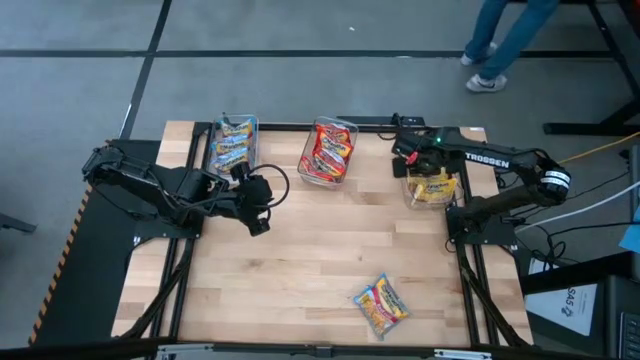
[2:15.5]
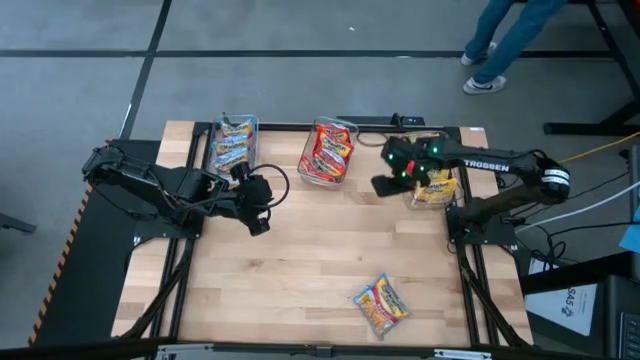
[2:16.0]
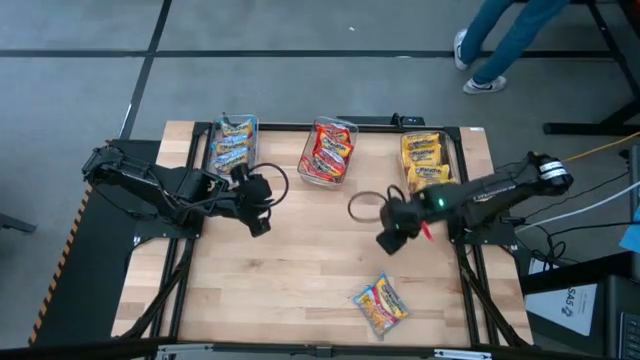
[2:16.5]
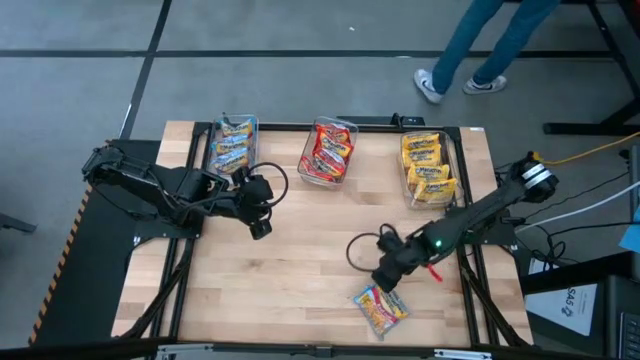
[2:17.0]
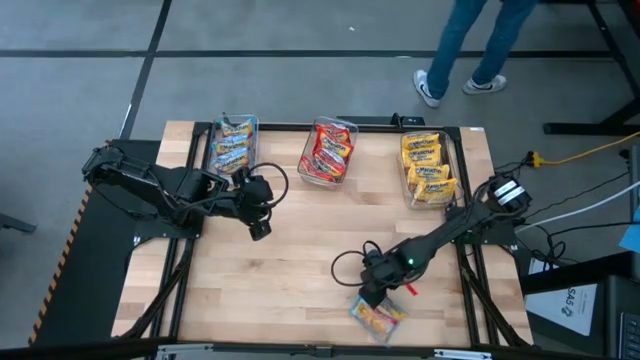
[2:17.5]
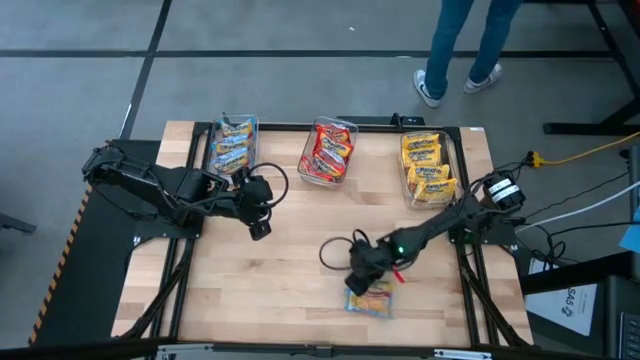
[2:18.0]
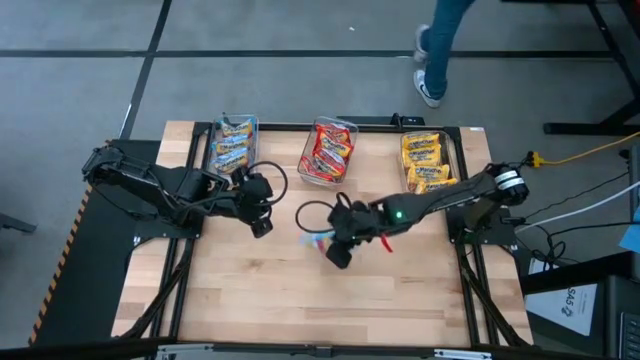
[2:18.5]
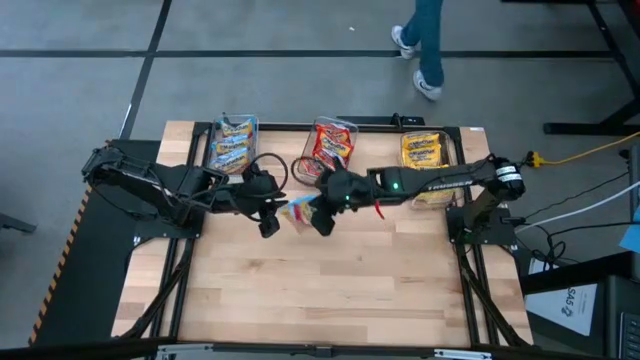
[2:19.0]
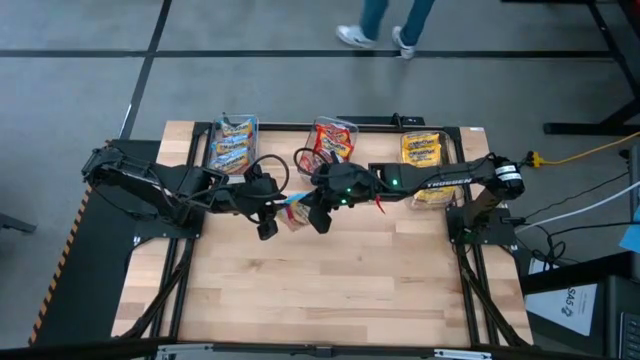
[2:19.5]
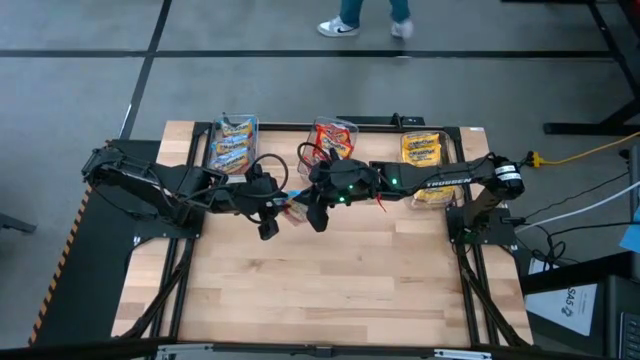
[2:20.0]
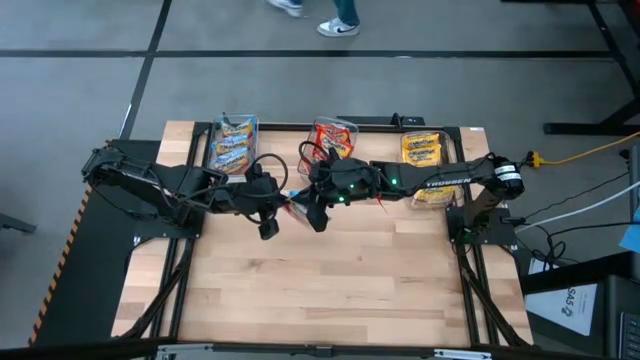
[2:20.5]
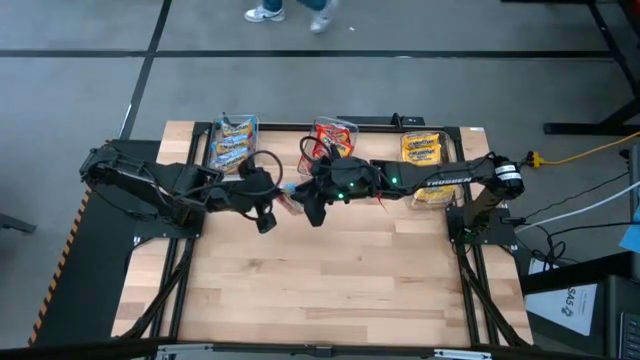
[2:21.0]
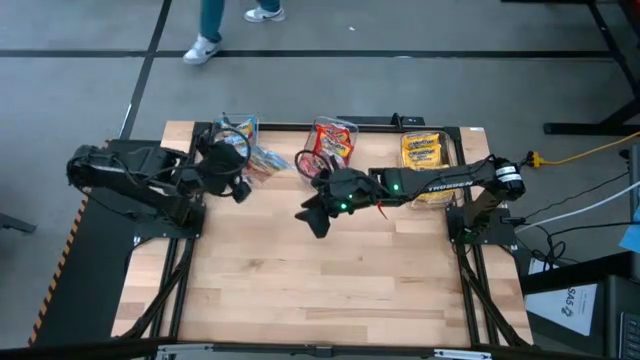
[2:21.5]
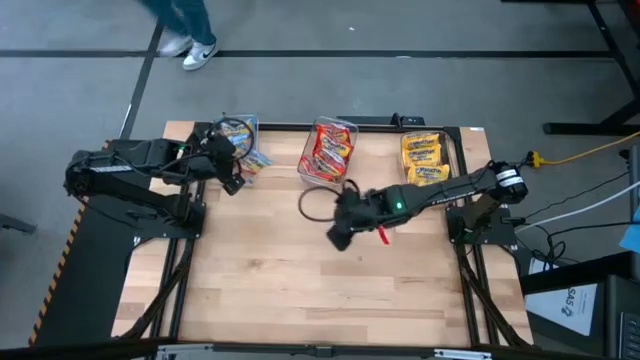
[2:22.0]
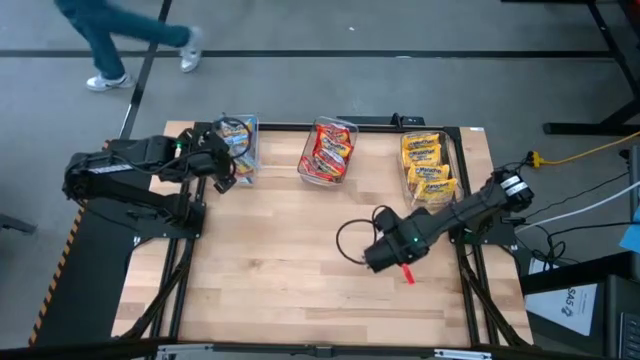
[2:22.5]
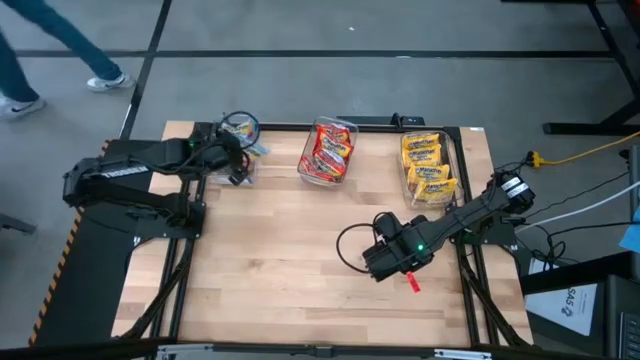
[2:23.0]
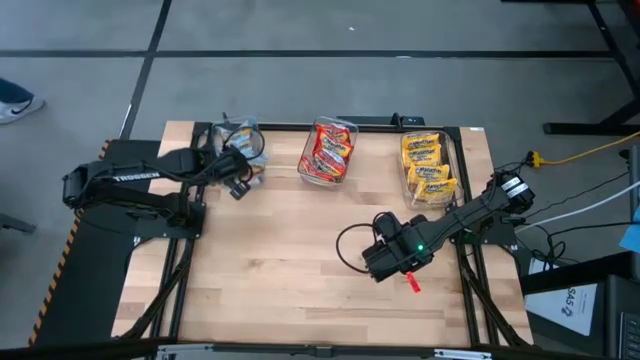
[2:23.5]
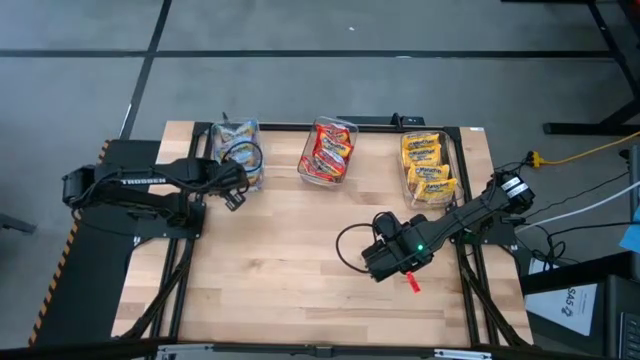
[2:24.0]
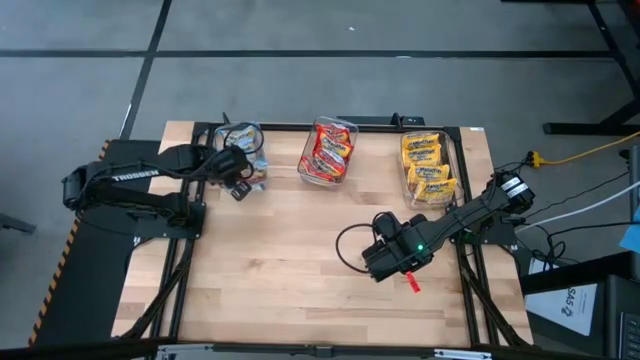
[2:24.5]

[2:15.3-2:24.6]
Task: Sort Maruchan noodles
Put the blue noodle pack in the left transparent basket

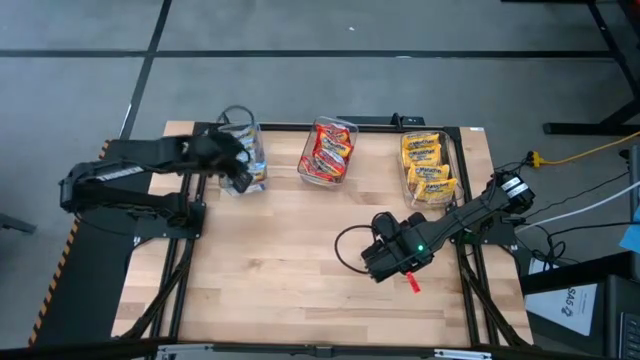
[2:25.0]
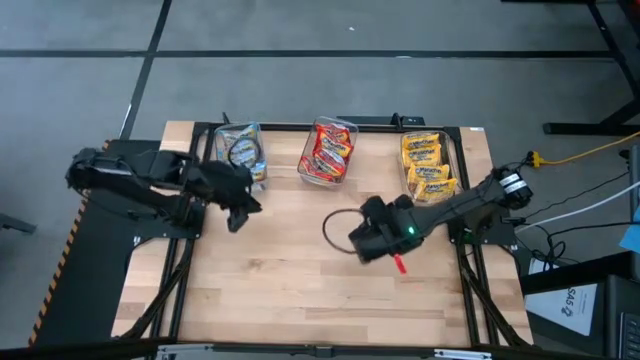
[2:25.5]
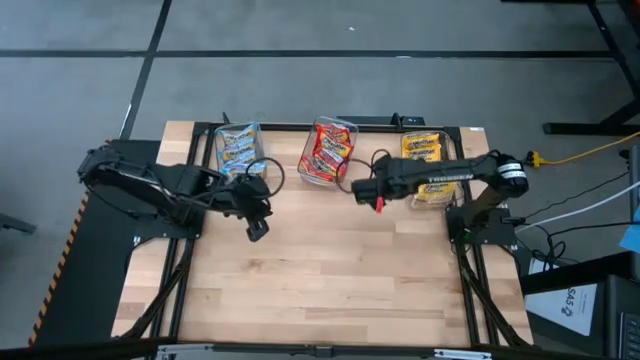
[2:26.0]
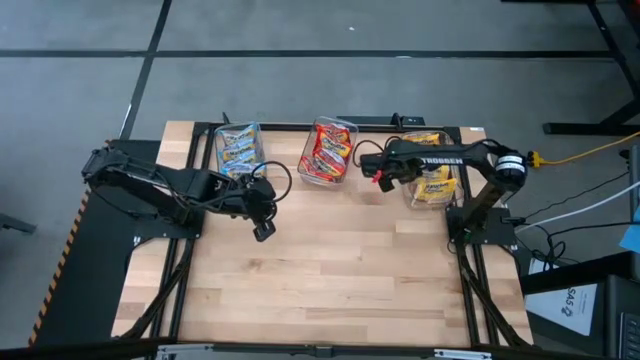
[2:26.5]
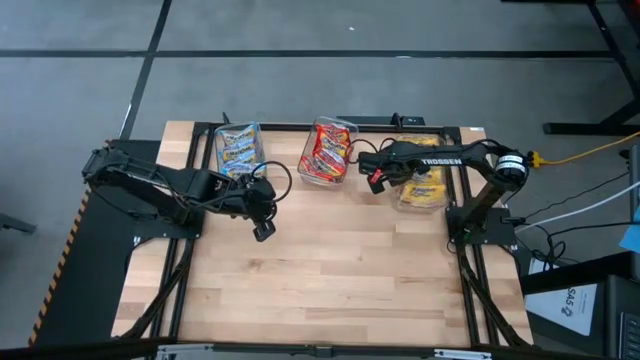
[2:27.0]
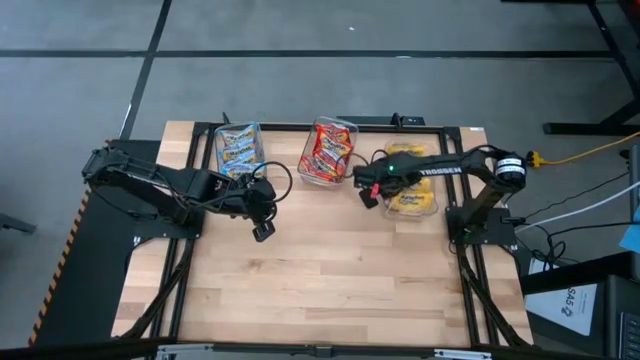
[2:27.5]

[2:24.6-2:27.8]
Adjust the right transparent basket

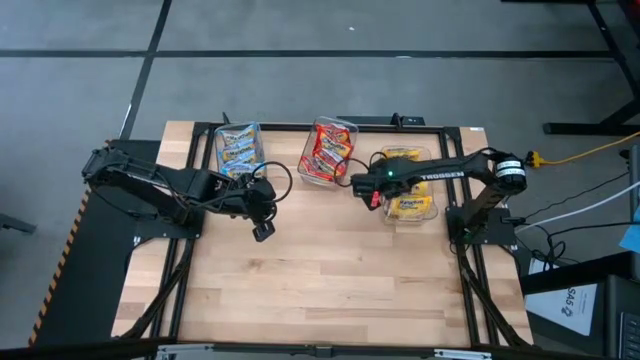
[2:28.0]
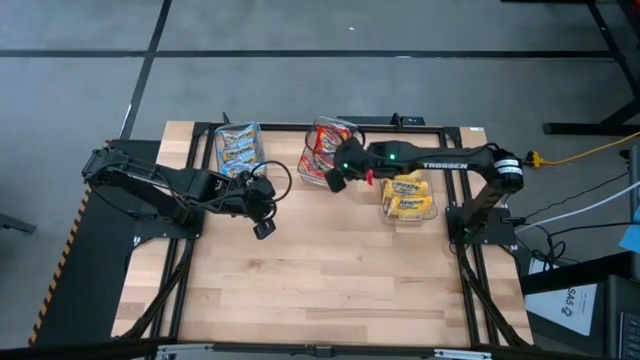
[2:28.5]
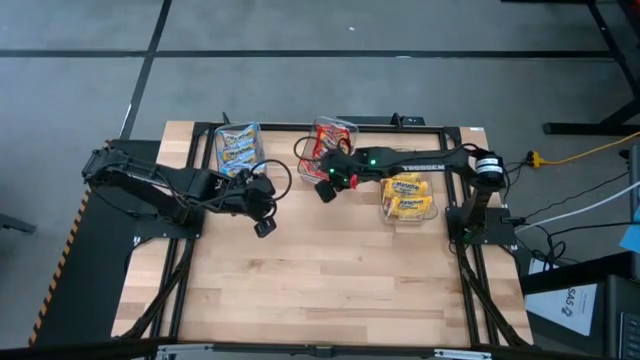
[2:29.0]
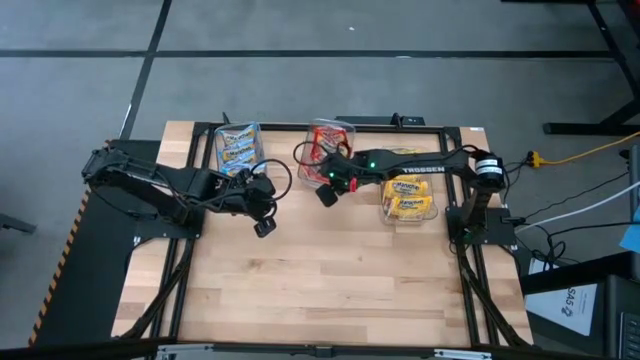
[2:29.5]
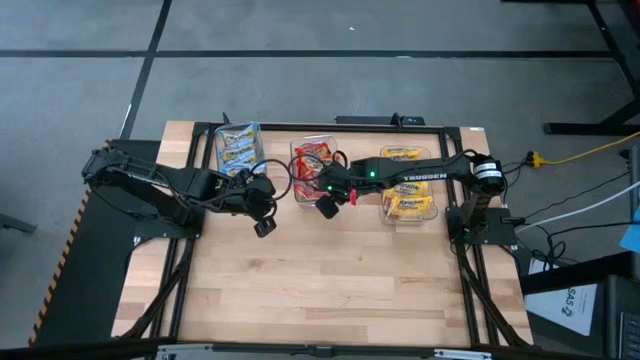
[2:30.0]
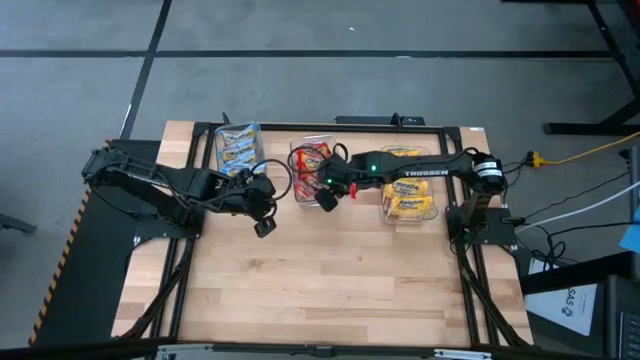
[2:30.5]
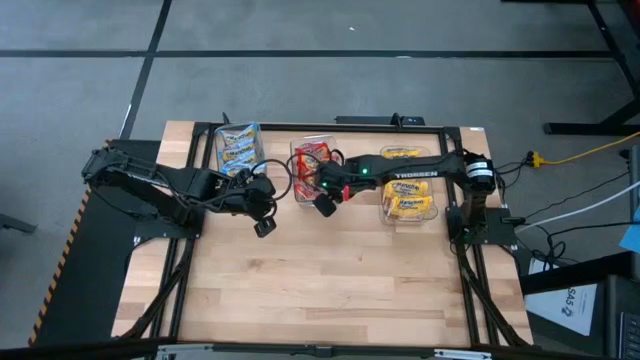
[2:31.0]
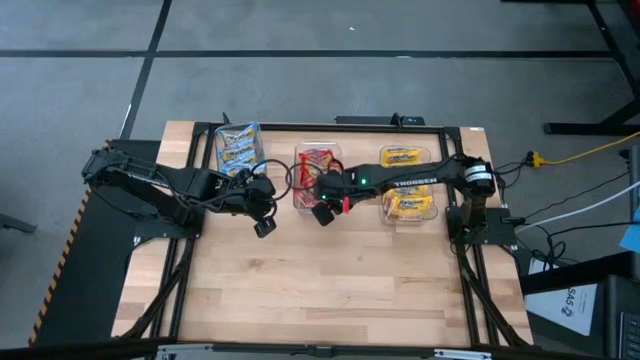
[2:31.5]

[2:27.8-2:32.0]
Adjust the middle transparent basket

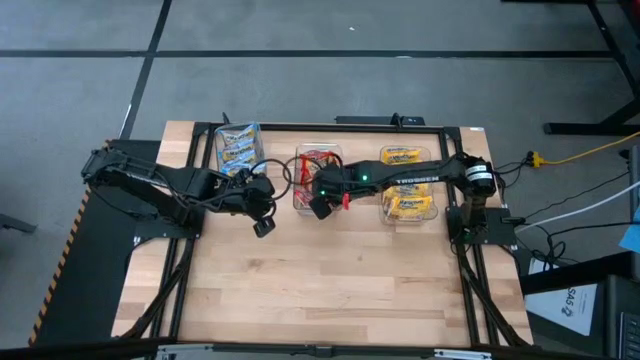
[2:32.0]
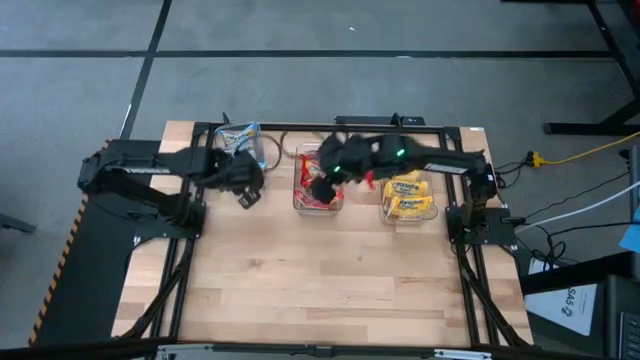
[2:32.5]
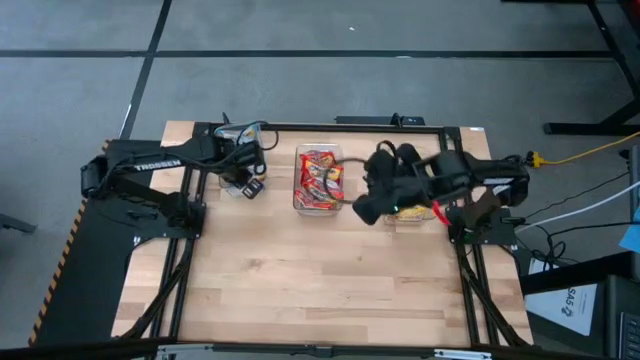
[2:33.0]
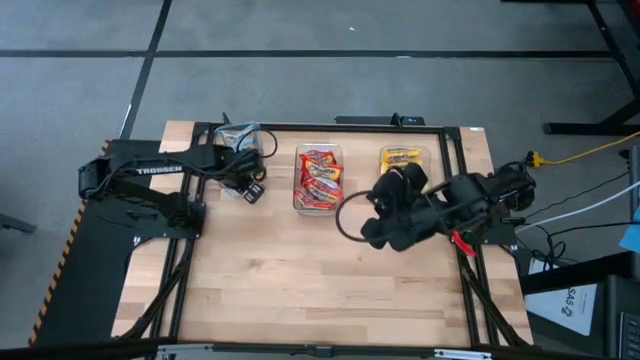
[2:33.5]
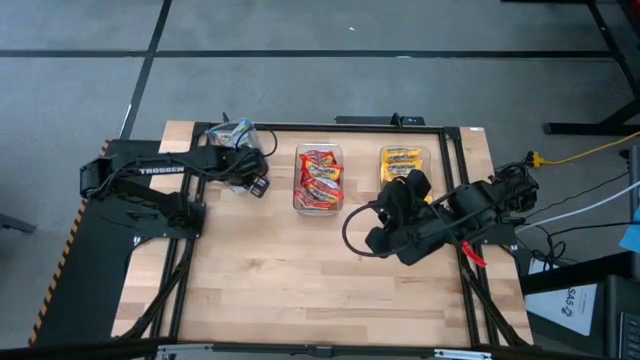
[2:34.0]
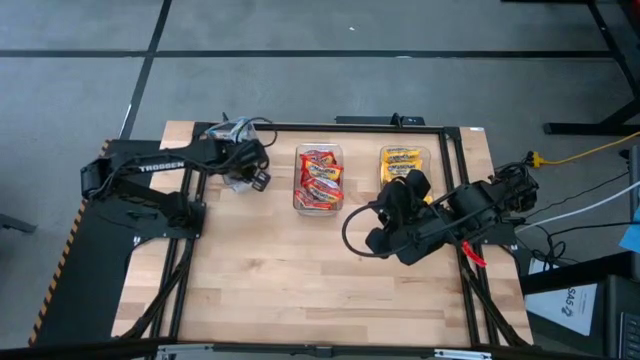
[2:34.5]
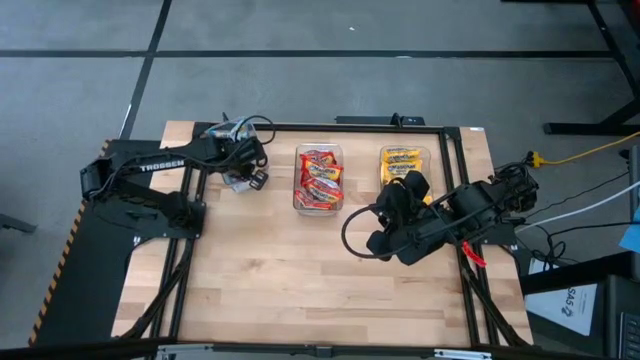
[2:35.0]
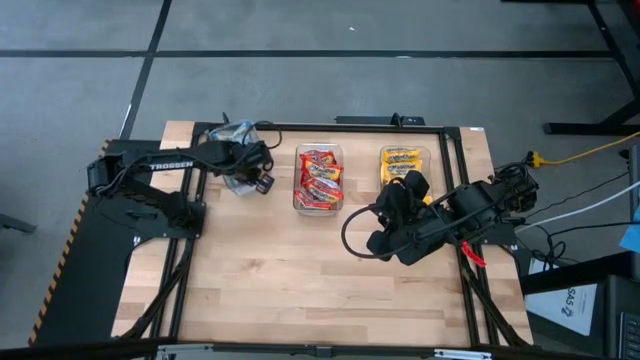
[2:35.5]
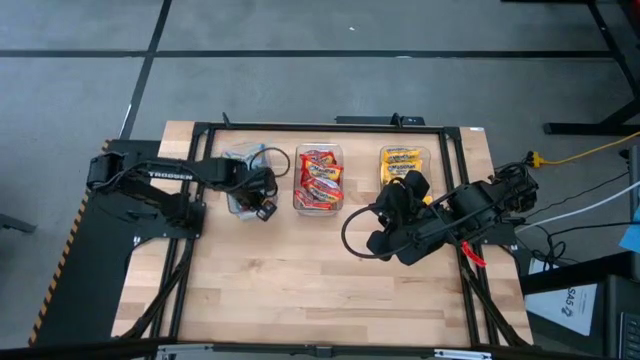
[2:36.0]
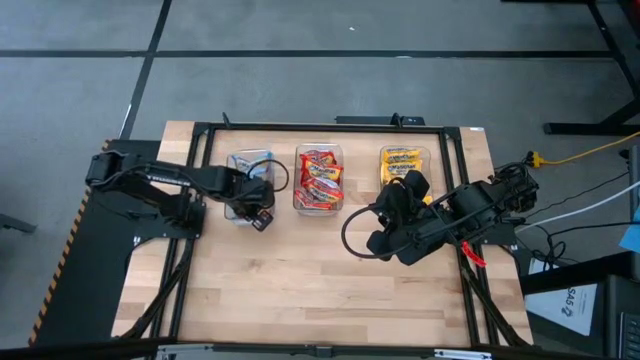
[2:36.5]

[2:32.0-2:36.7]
Adjust the left transparent basket

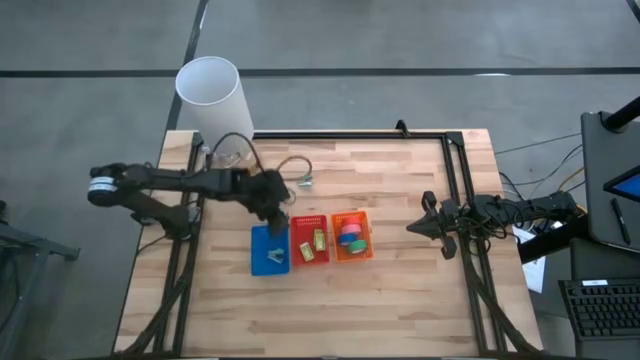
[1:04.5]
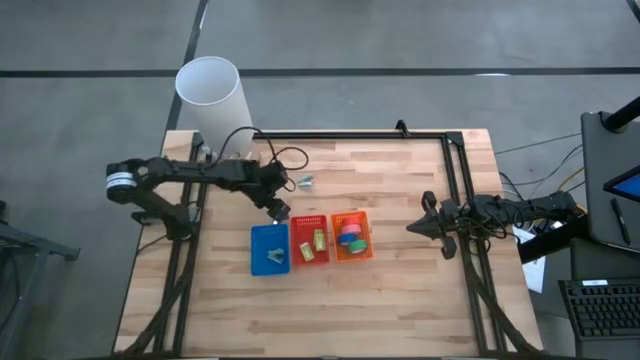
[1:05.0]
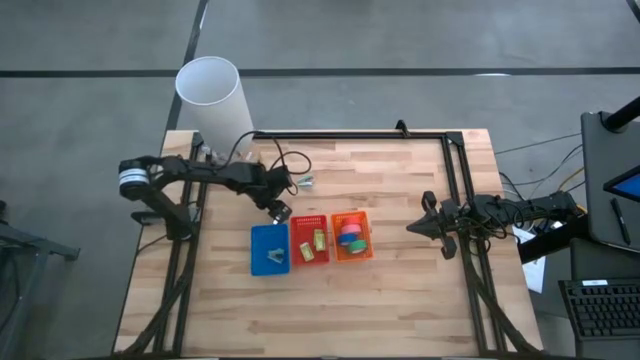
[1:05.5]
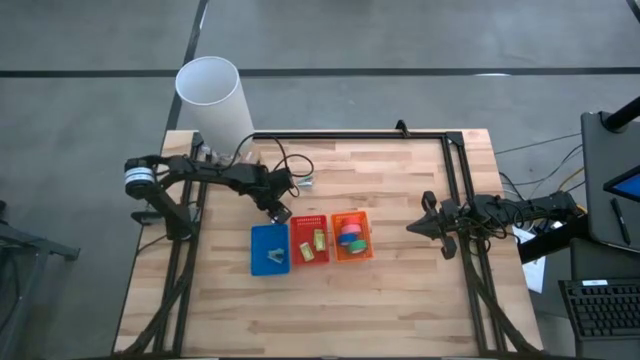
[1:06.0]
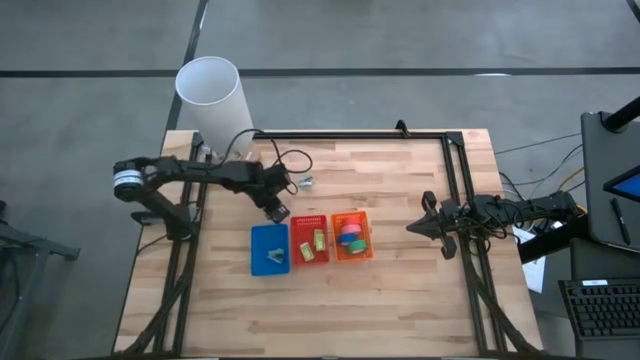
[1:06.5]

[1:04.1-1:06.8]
Task: Pick and place Stapler, Stapler remover, tape
Put the dark blue staple remover into the blue bin
